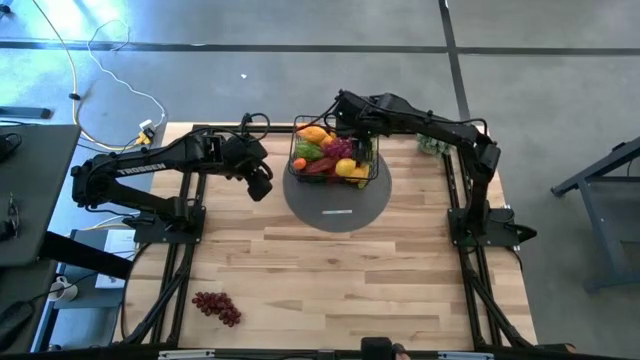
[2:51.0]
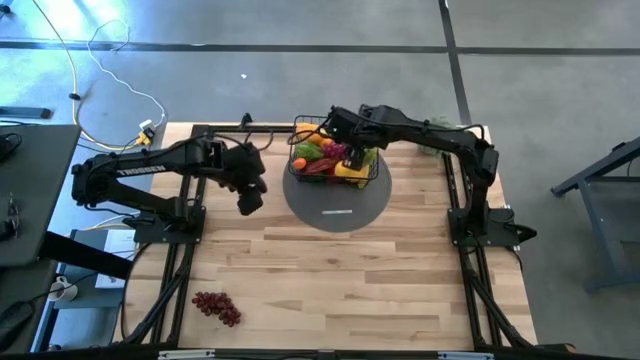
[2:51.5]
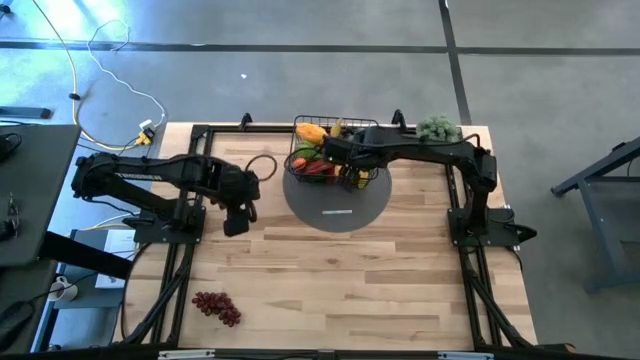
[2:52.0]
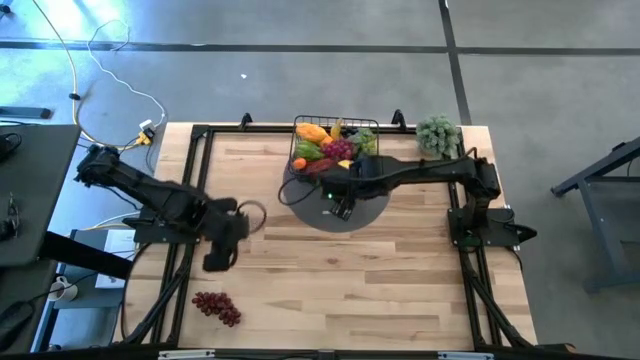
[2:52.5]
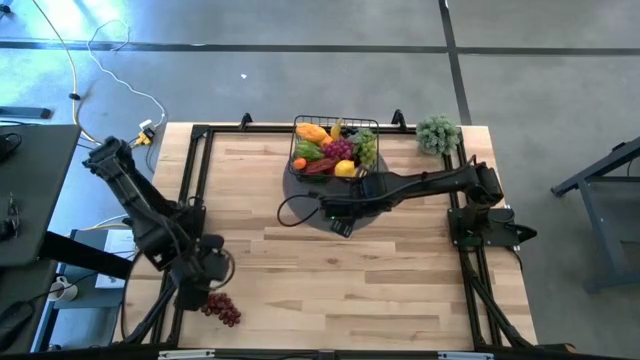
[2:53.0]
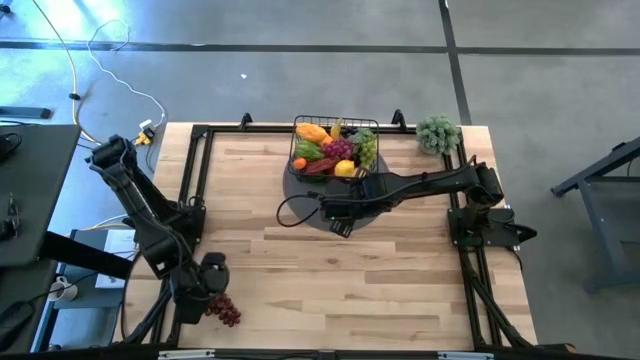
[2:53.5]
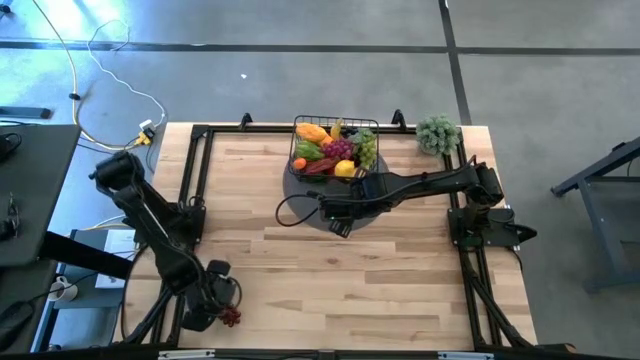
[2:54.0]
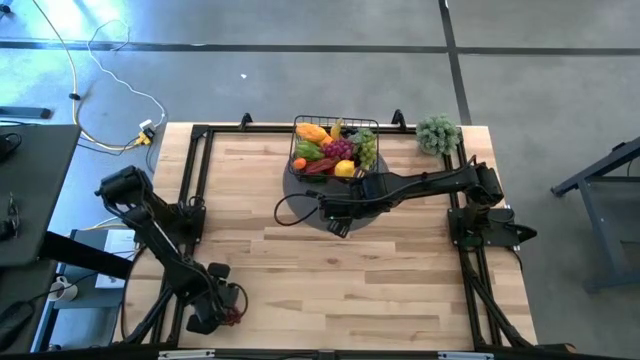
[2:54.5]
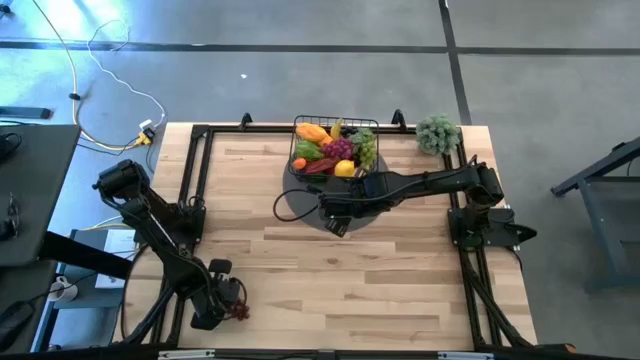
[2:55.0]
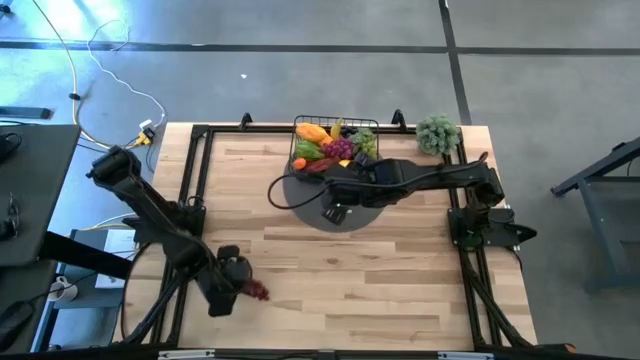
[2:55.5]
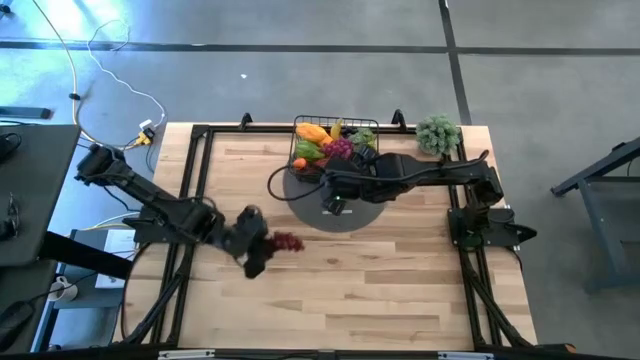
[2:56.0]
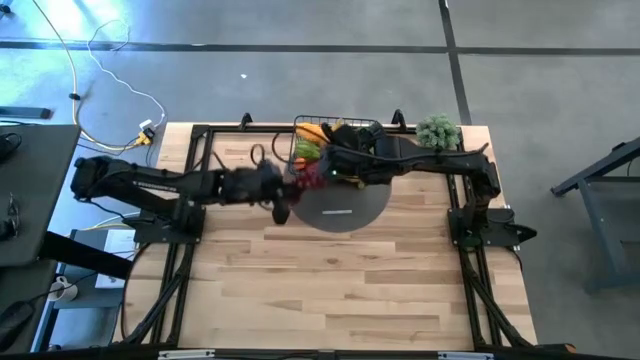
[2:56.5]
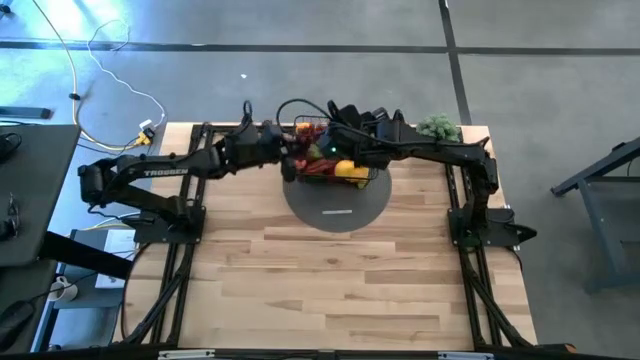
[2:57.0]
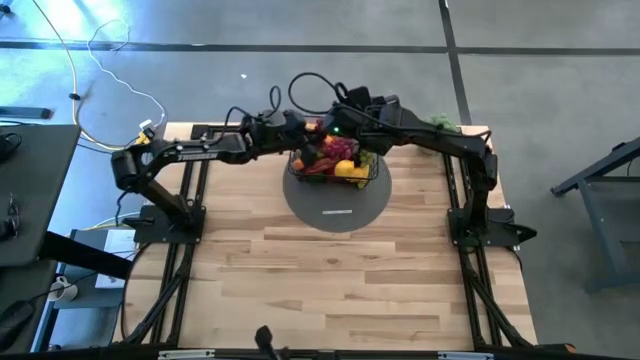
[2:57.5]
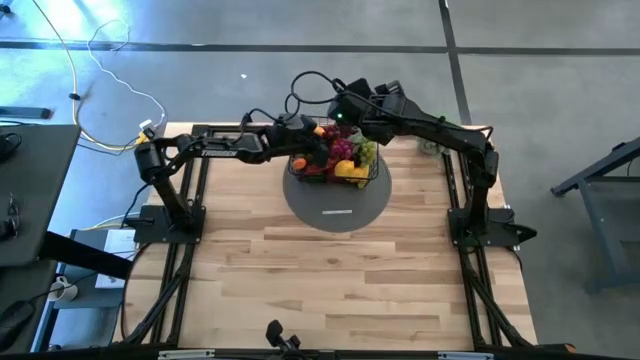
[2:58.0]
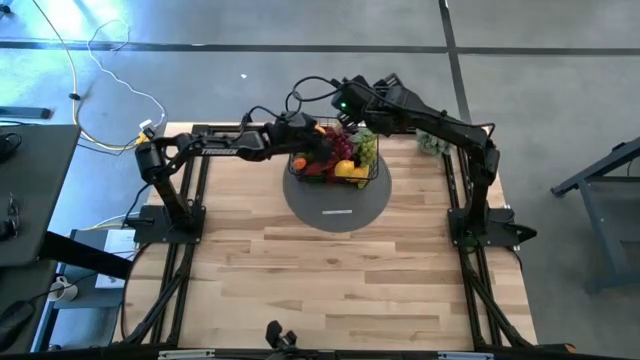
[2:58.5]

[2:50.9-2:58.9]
Task: Build produce basket
Put the red grapes into the wire basket

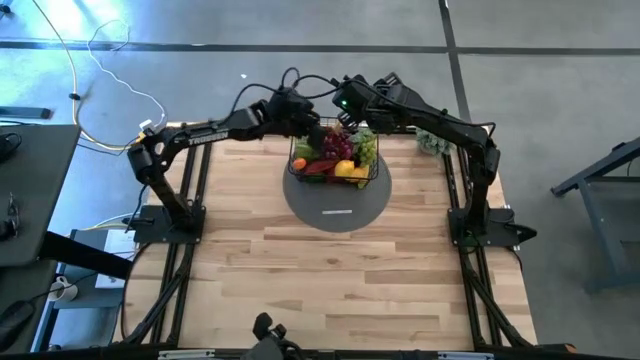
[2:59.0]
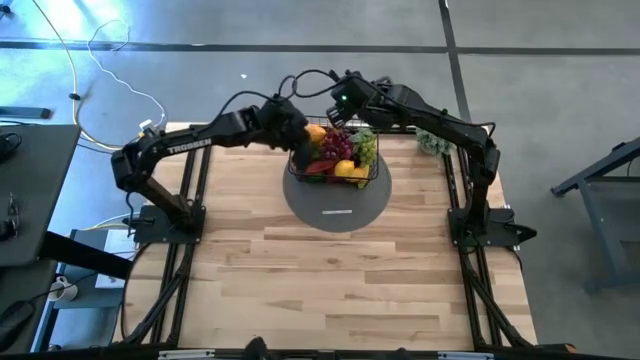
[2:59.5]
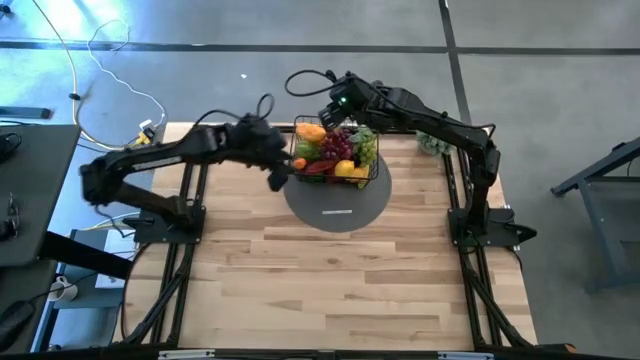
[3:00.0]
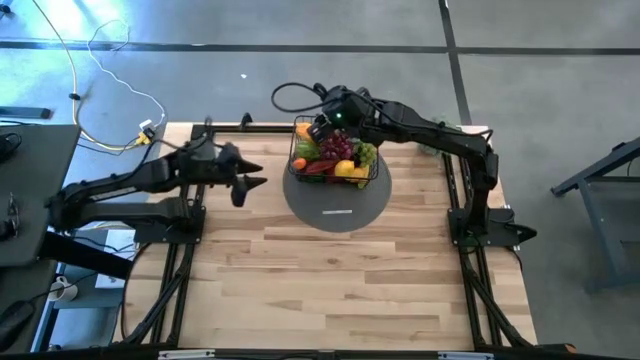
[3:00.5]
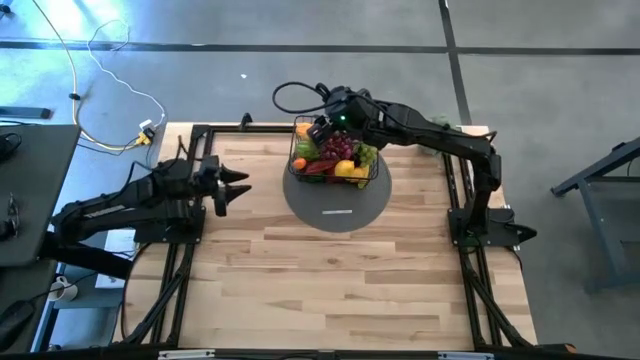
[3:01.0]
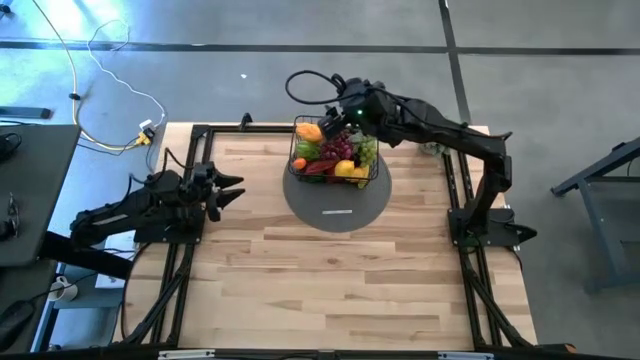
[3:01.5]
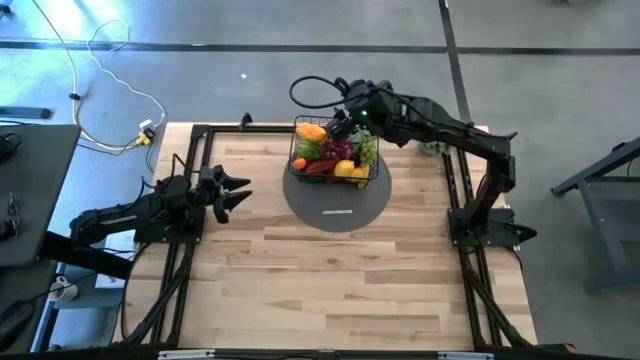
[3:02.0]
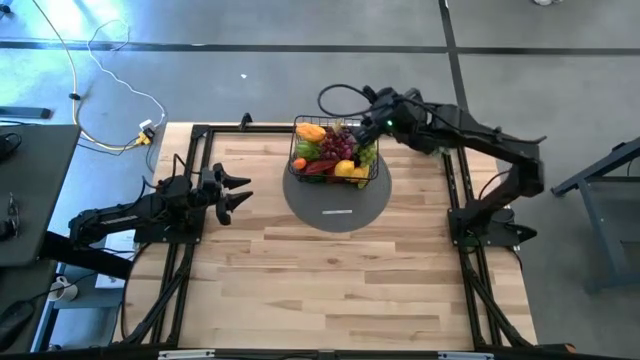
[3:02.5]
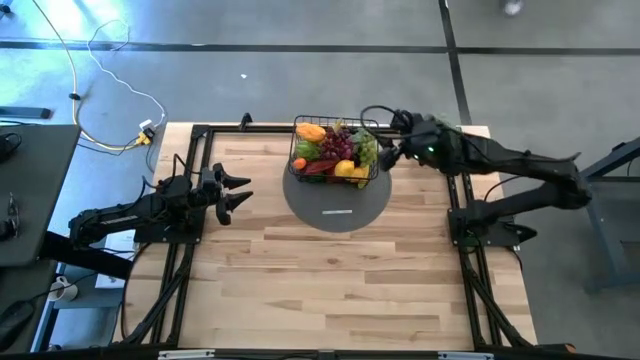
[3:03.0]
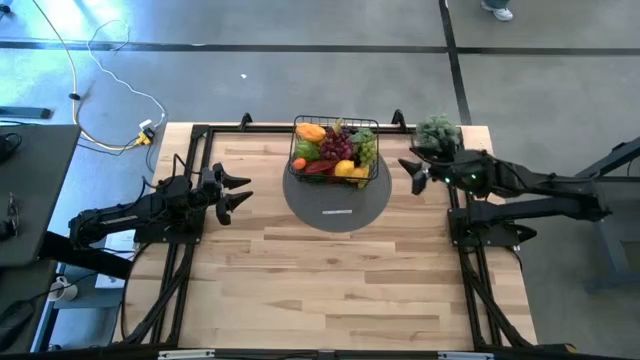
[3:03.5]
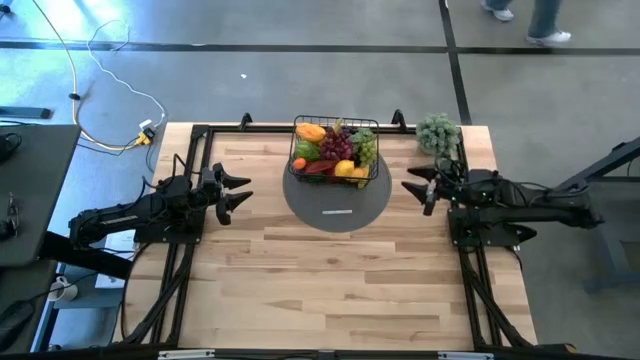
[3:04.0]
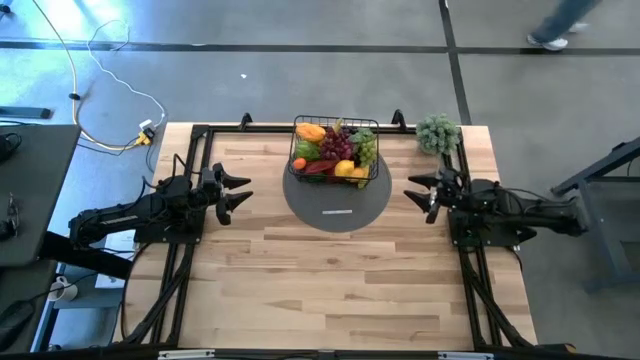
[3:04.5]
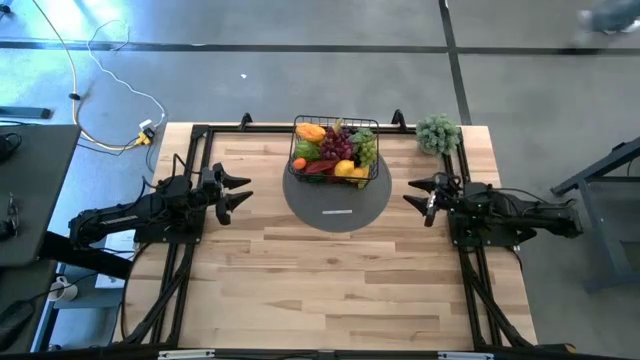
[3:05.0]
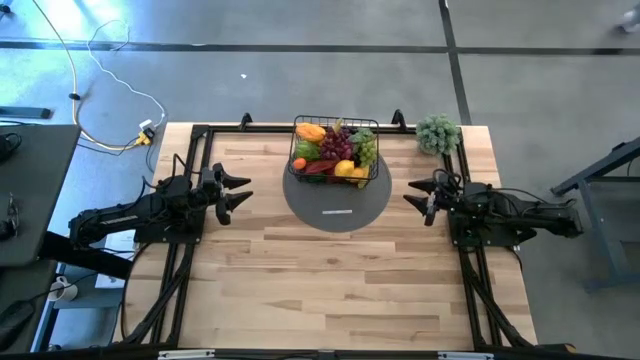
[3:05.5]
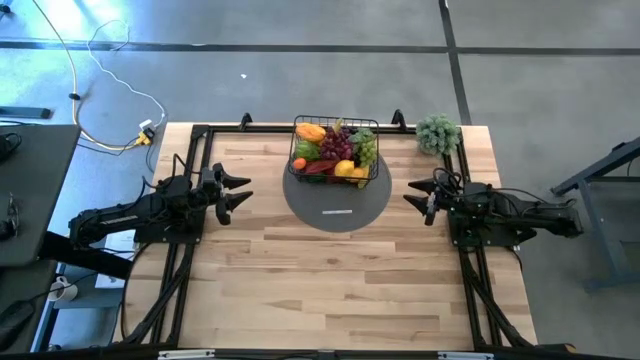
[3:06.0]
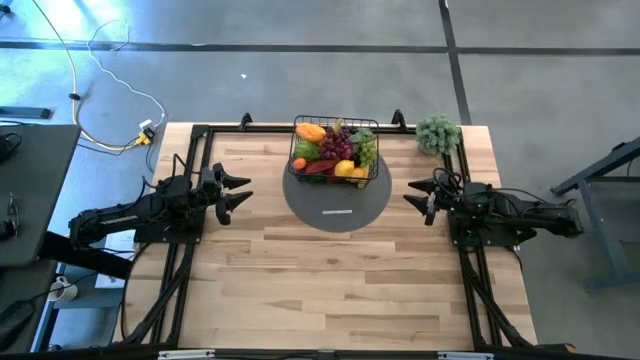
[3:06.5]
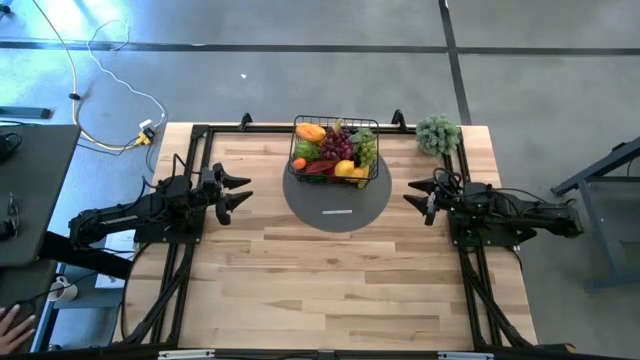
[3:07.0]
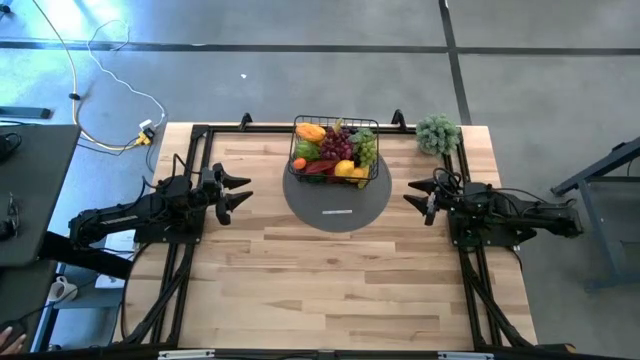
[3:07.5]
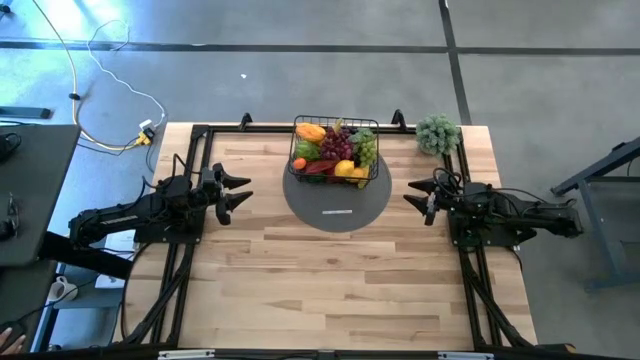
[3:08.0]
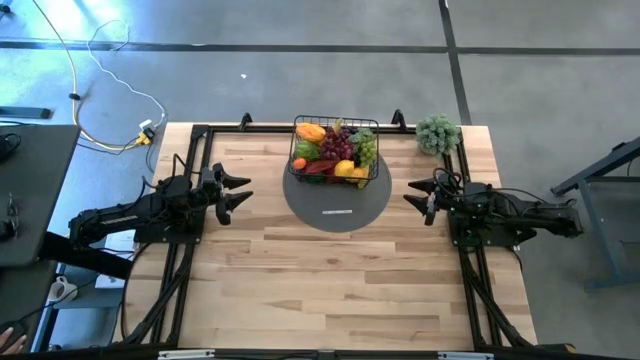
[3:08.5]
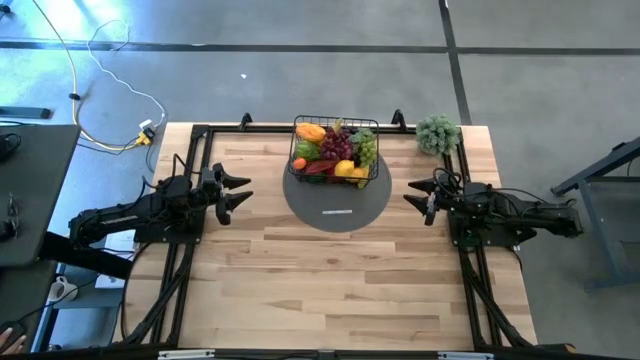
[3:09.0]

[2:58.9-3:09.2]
Return to Home Position

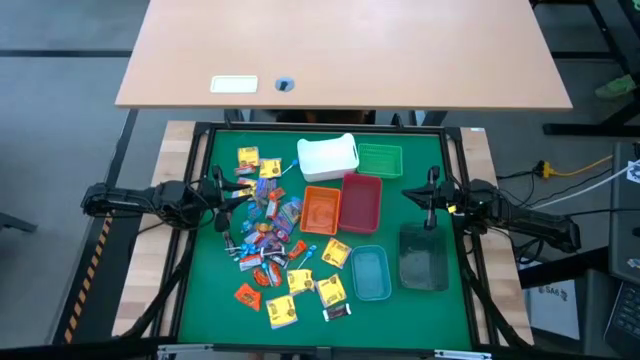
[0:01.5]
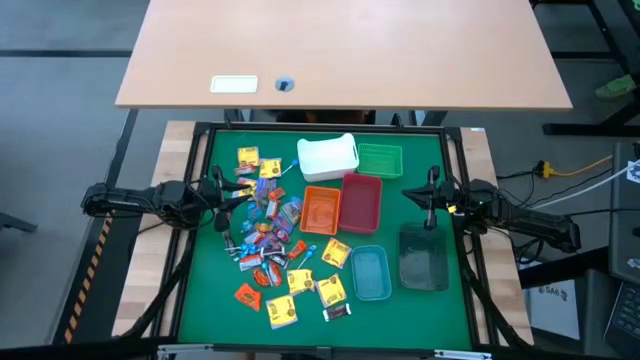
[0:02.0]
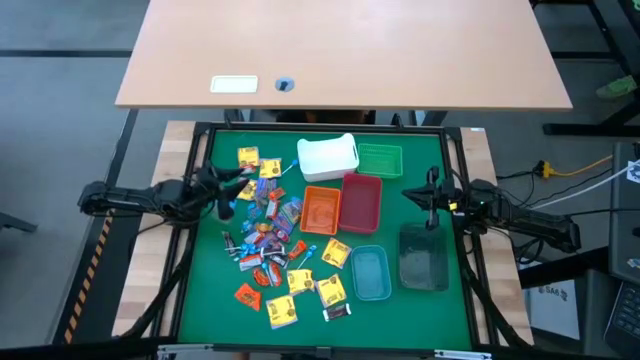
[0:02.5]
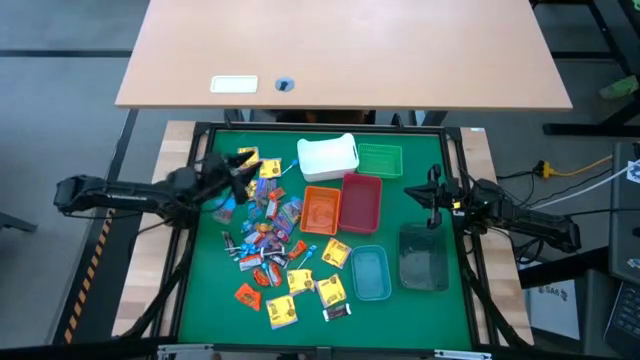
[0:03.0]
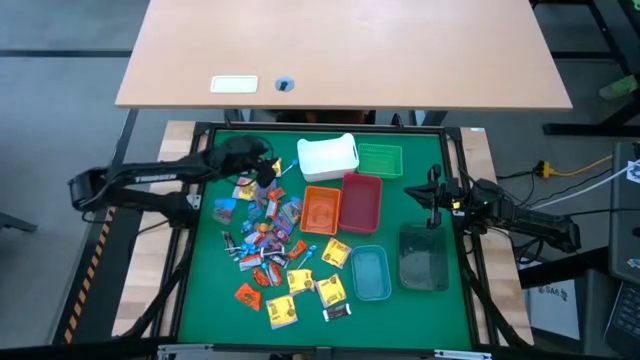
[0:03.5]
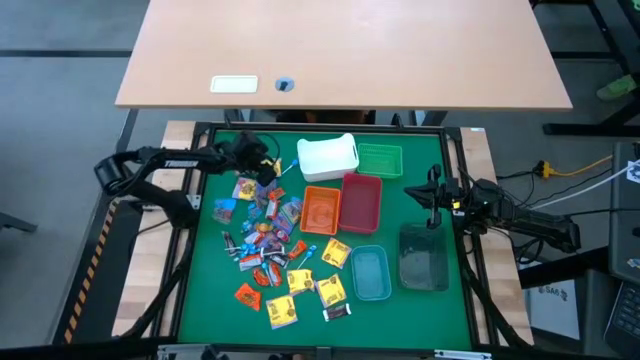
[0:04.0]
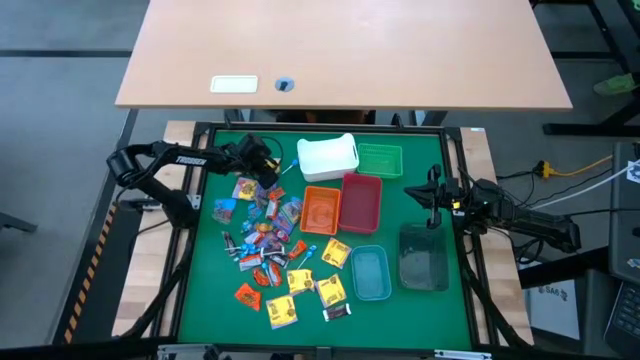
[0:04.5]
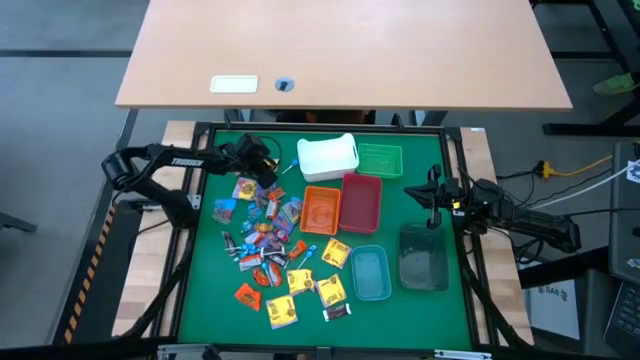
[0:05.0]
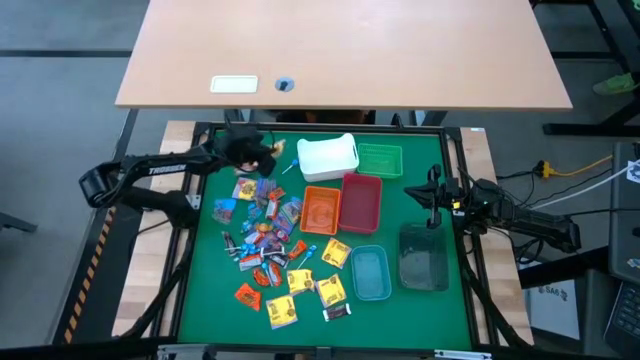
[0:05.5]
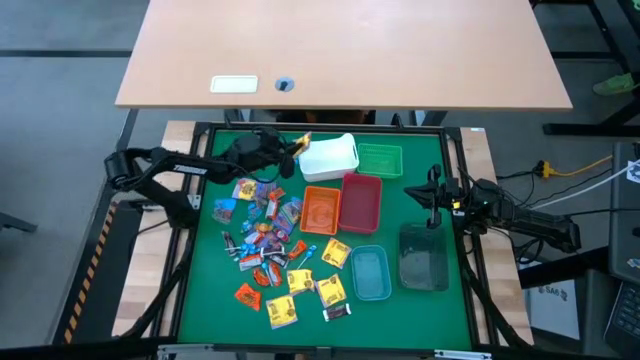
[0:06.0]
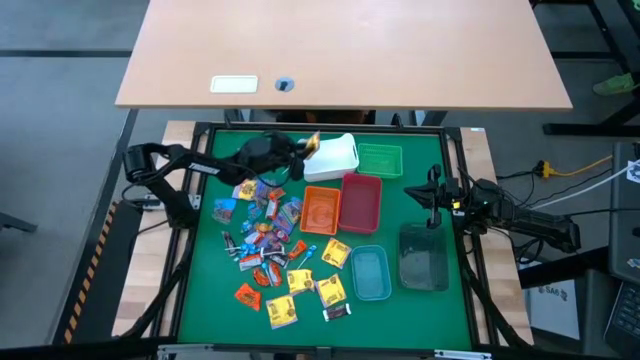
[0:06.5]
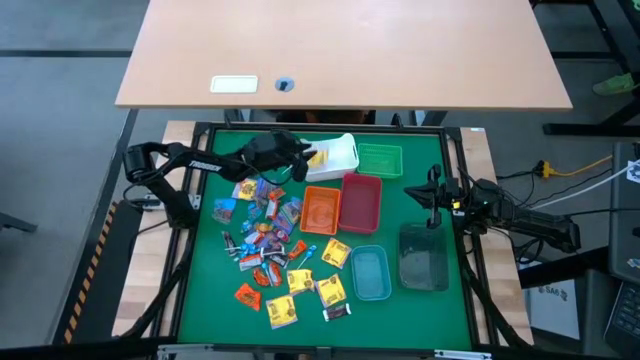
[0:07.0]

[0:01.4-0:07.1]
Task: Sort candy
Put the yellow bag of candy into the white bin
